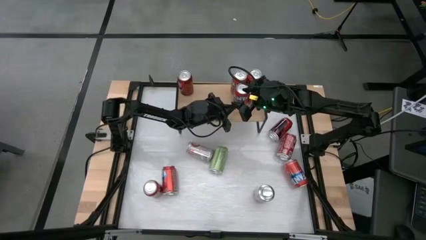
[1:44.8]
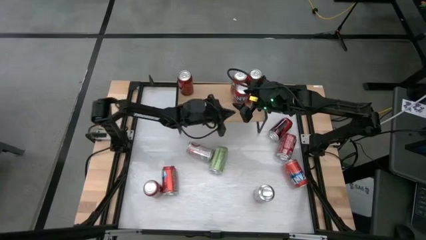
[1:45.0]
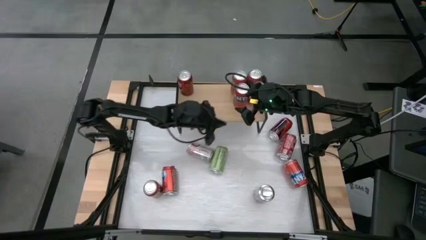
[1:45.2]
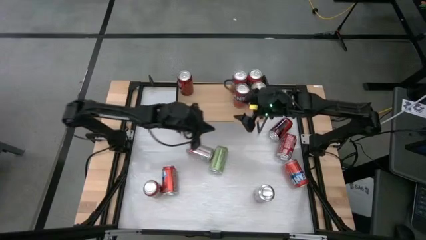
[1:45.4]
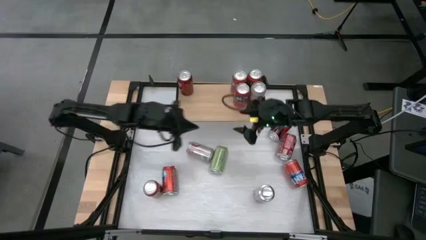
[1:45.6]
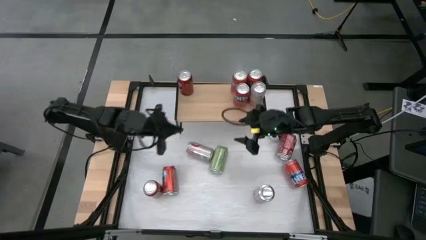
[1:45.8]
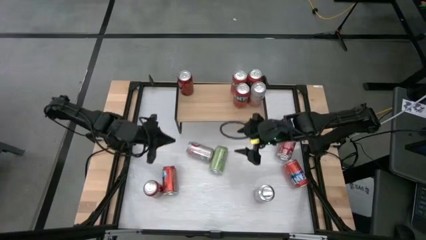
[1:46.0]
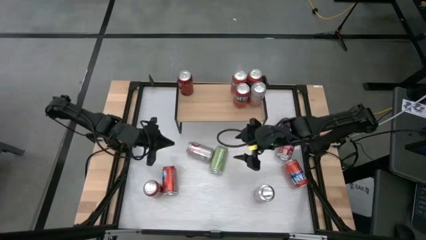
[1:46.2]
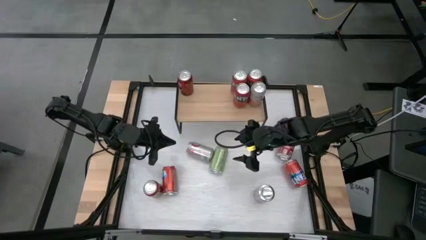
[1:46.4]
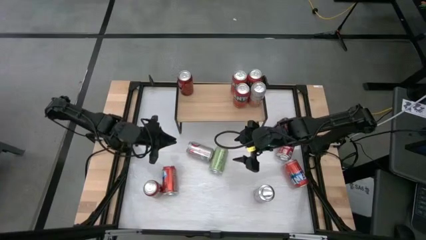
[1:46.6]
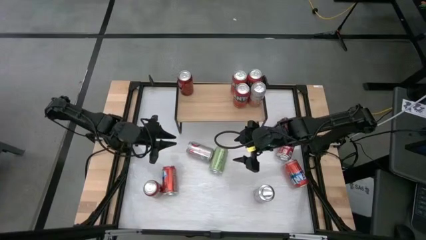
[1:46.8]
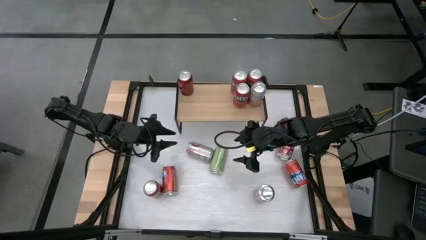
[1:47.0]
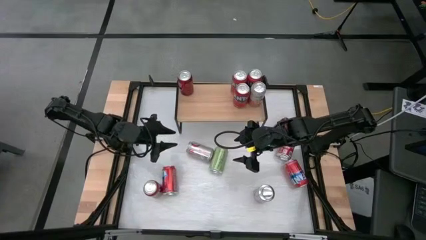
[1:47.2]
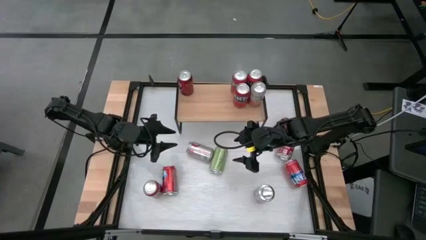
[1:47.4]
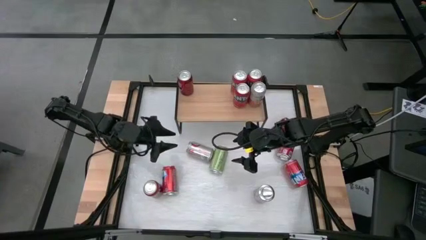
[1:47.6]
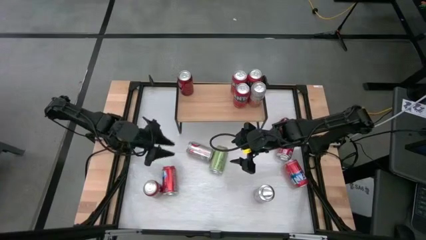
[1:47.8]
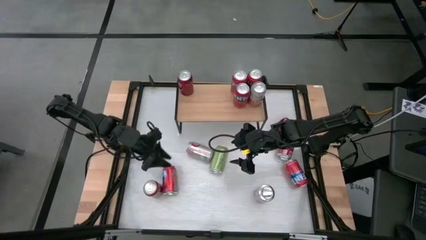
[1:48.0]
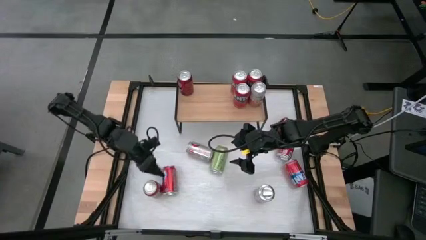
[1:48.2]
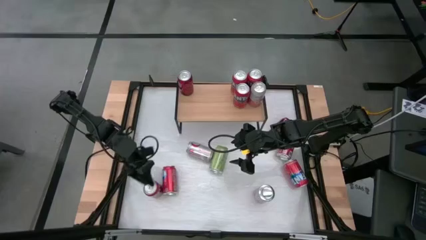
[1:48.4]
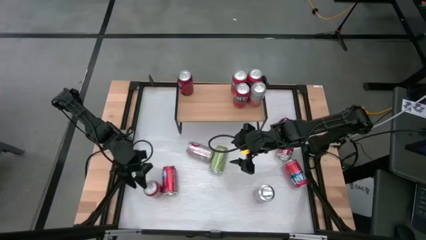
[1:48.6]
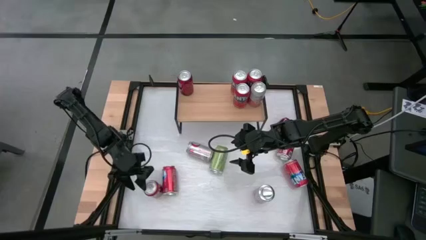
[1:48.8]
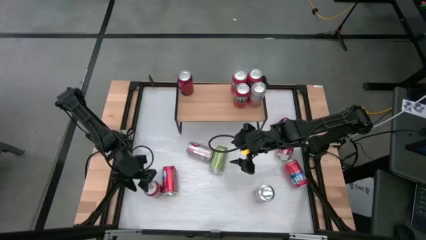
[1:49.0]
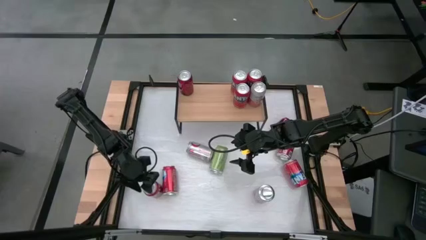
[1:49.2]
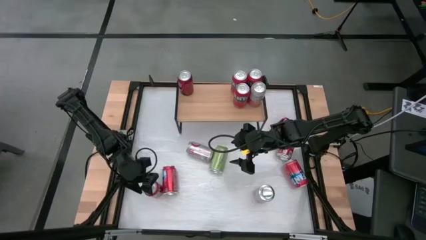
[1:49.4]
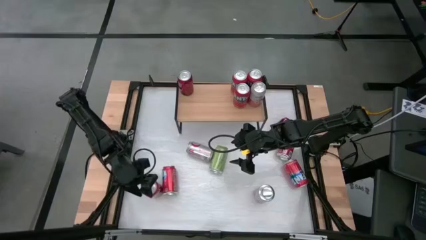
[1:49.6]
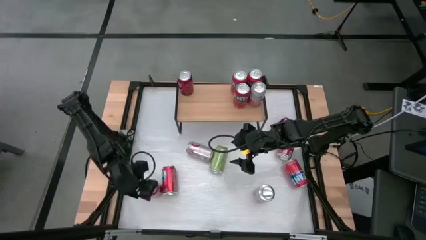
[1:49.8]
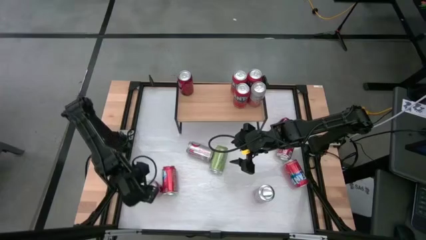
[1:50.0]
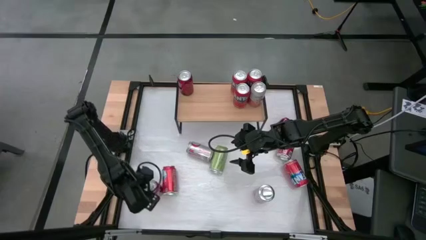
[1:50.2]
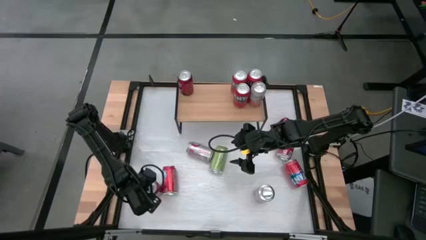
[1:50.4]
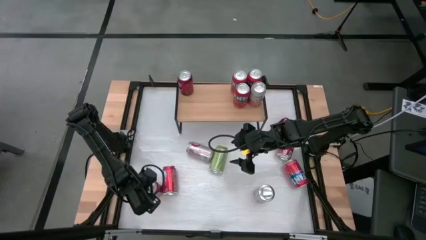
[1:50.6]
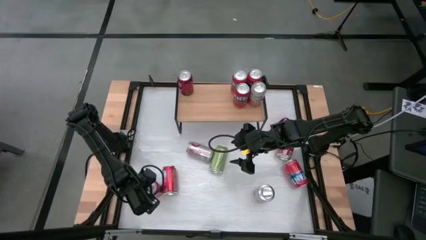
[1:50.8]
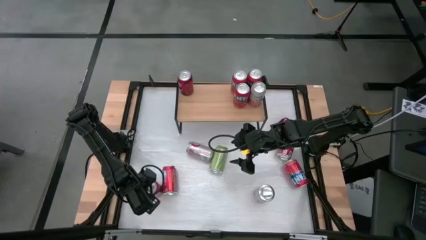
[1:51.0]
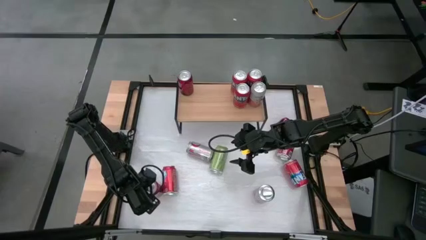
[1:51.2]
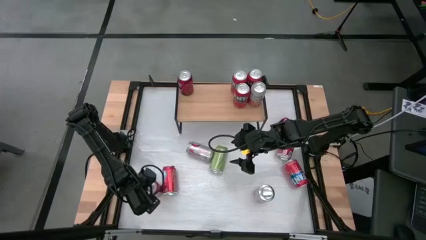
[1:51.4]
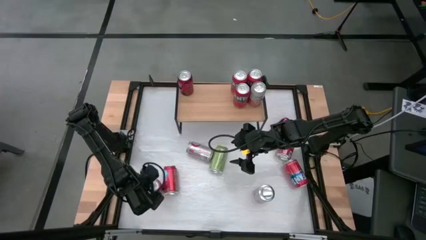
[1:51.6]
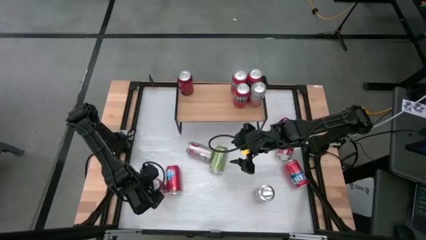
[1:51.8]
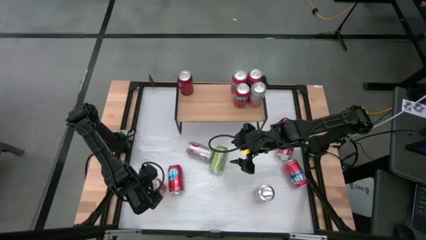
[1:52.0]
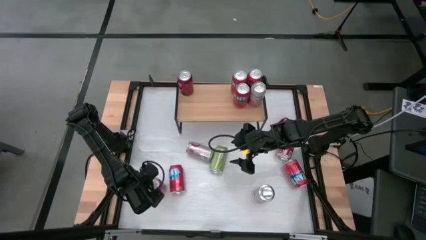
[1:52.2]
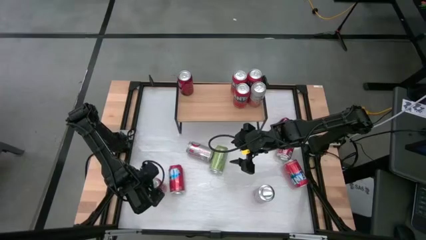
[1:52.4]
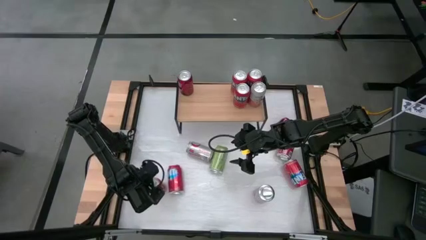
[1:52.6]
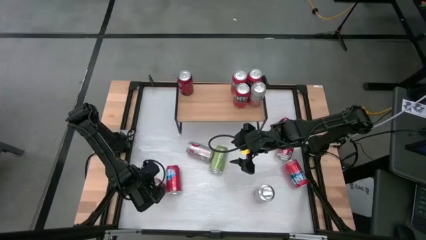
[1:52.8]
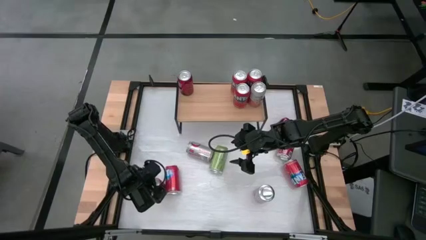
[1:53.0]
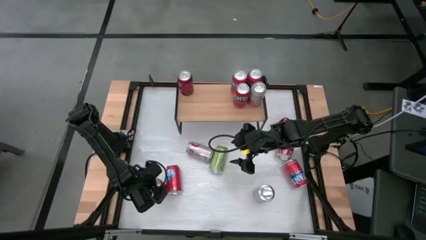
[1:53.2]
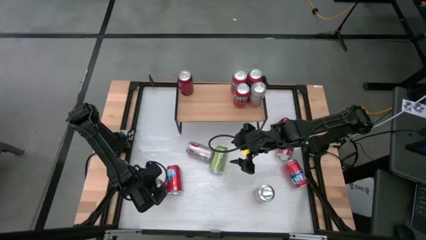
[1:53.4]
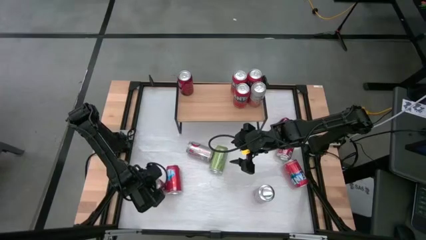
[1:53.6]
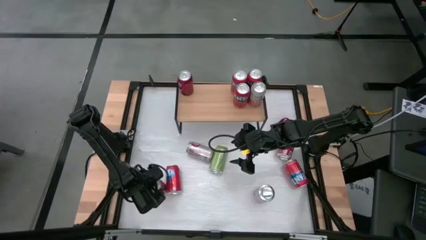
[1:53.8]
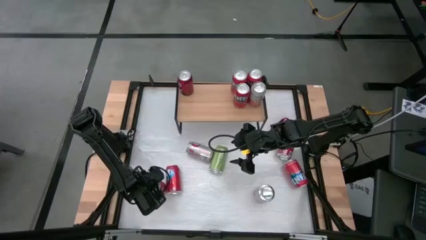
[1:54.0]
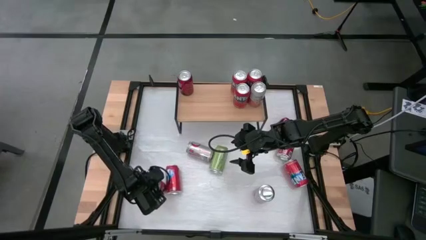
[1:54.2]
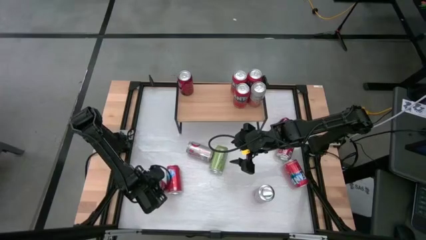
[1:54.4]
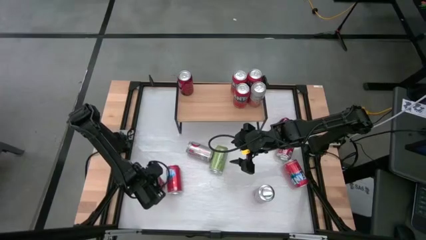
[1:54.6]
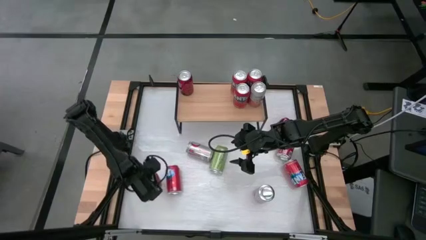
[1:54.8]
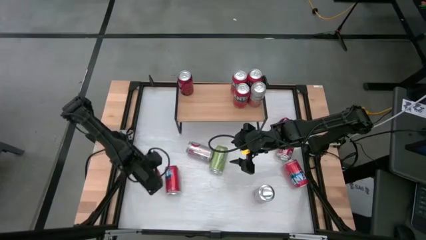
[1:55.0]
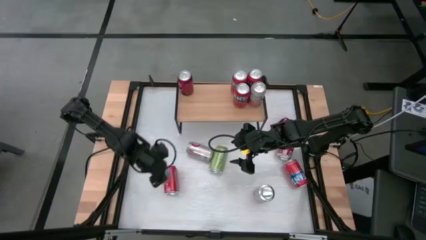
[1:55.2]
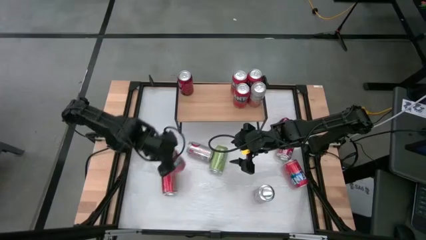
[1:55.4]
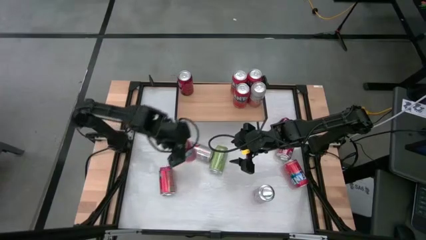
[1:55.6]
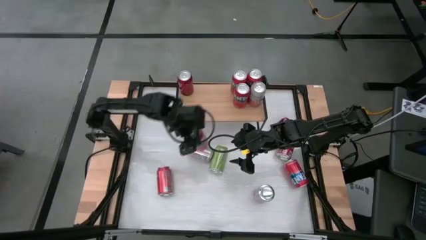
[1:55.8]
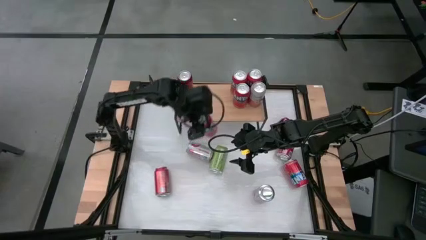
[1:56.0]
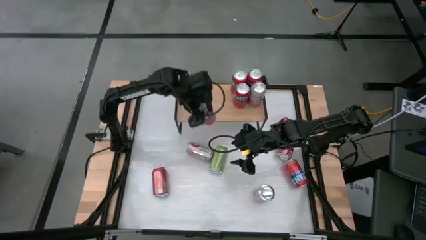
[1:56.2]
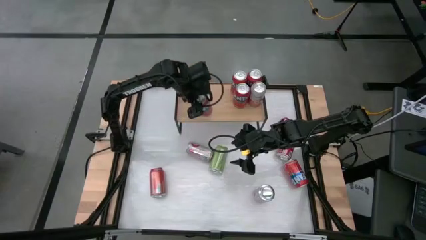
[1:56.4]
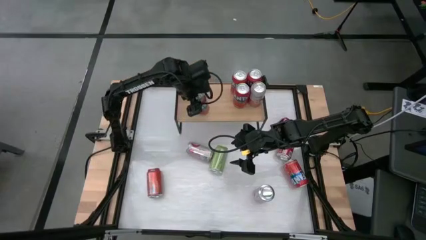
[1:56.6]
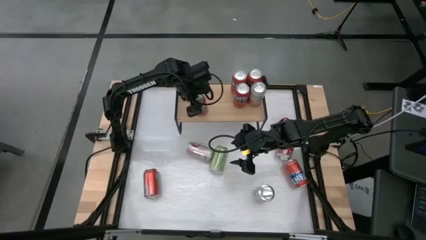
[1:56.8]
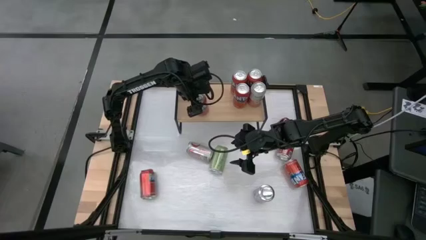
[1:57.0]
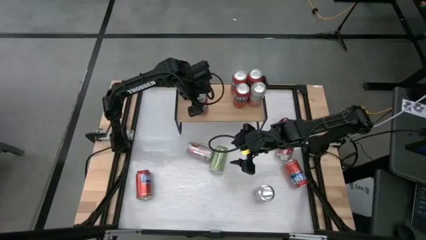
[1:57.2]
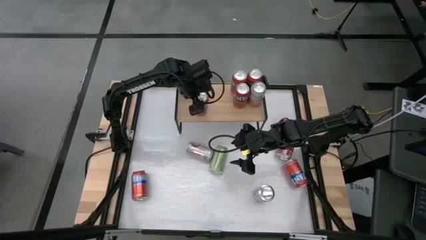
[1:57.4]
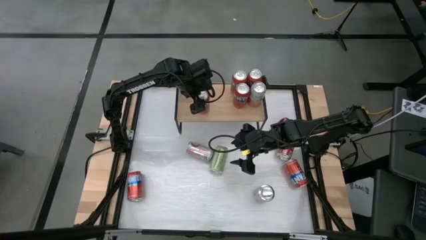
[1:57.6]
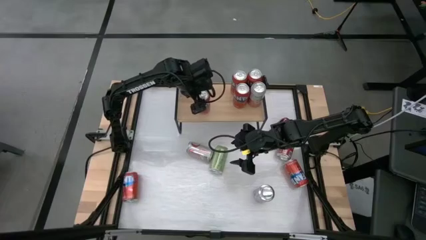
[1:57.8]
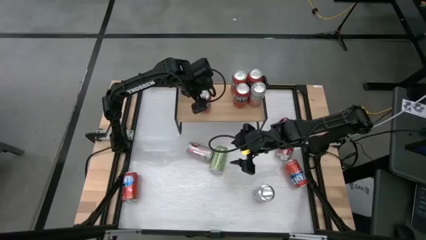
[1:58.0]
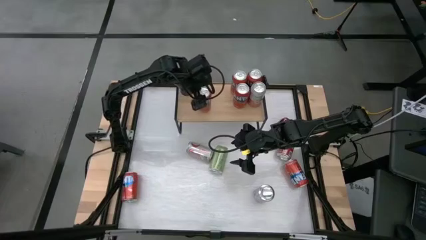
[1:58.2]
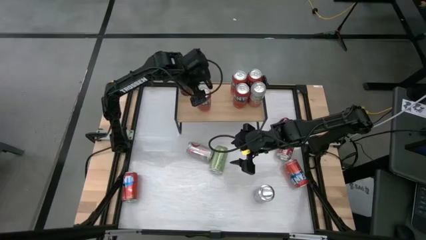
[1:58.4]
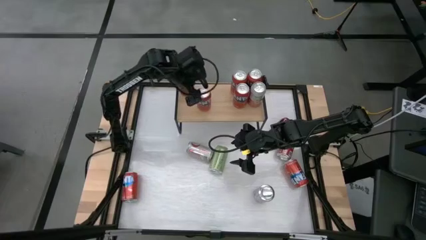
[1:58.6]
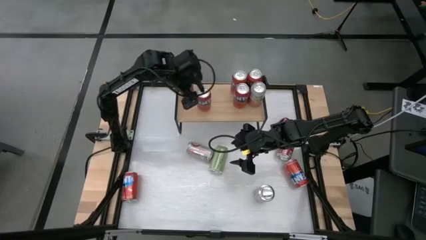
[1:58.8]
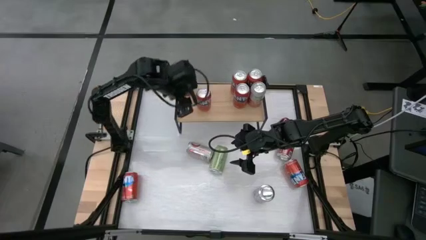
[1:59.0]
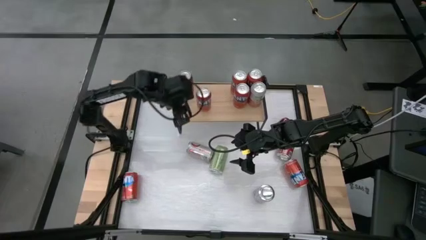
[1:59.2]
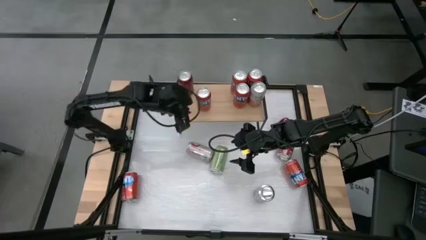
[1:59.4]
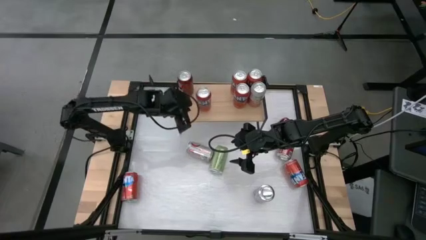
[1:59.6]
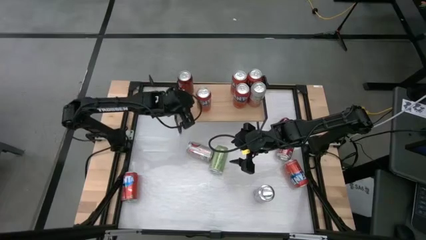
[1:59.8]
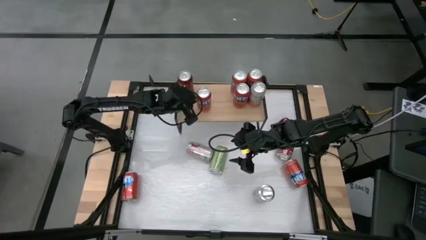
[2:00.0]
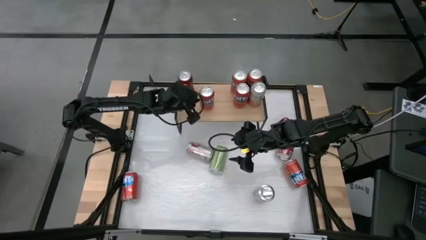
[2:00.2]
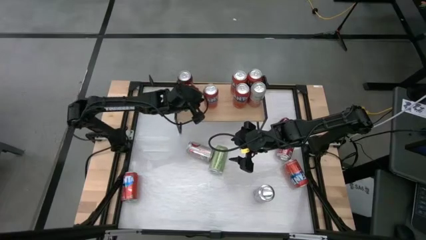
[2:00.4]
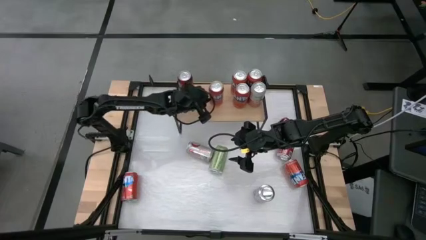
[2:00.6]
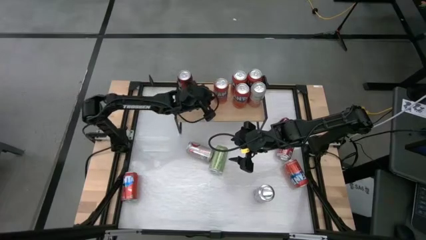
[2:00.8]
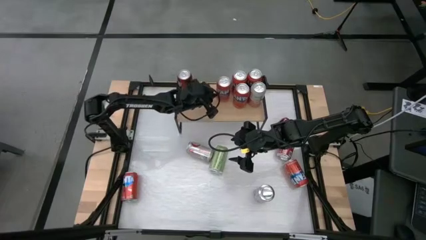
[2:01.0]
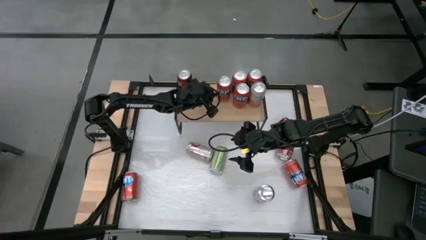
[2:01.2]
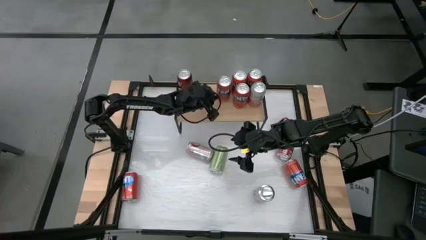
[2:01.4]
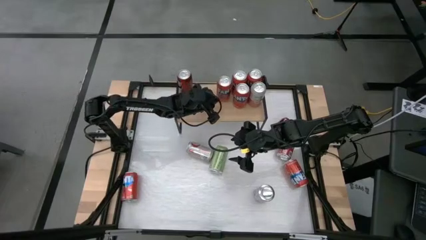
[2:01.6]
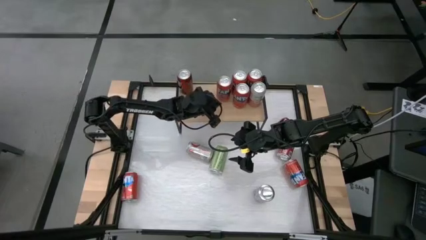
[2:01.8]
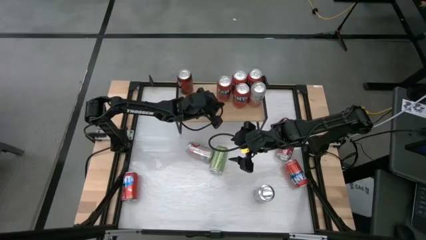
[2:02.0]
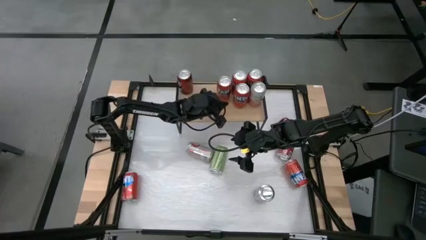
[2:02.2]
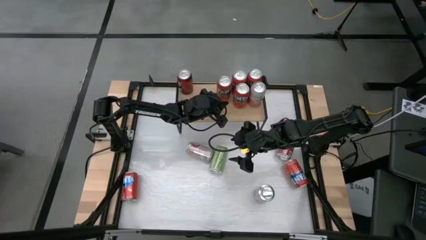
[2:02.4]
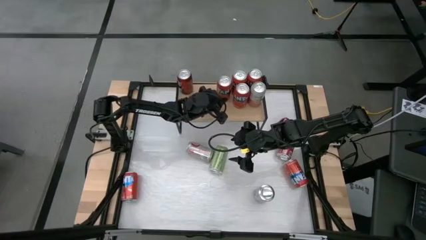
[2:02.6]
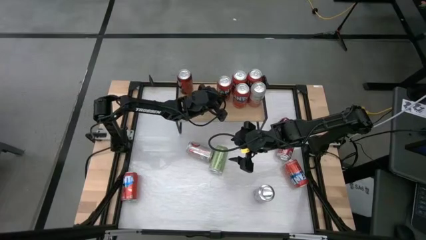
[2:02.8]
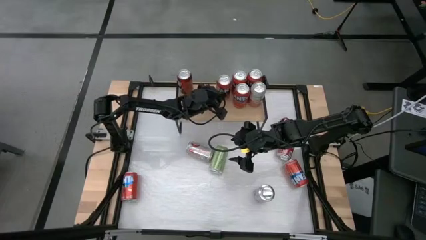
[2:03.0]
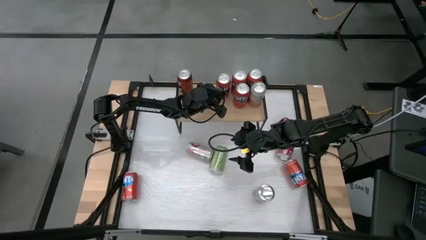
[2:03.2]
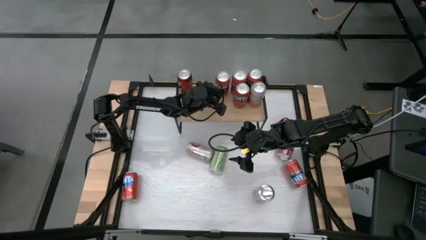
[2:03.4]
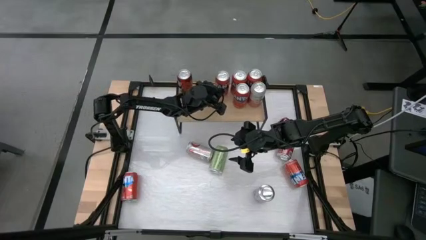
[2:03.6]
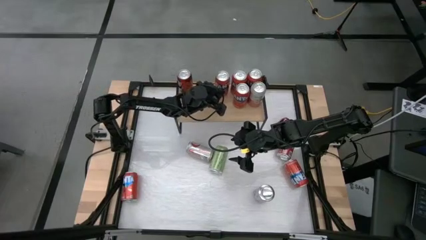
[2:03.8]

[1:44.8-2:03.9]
Task: Place canned beverage on shelf
Put the orange soda can on the shelf aligned with the other orange soda can
